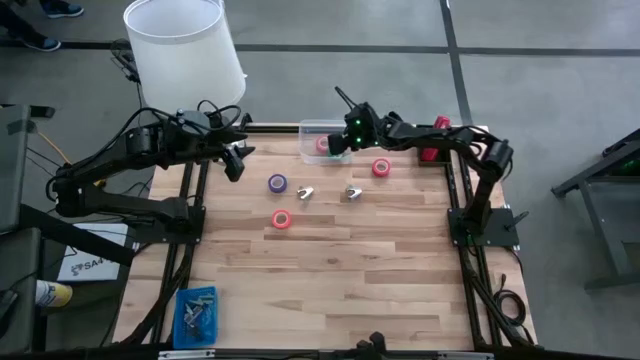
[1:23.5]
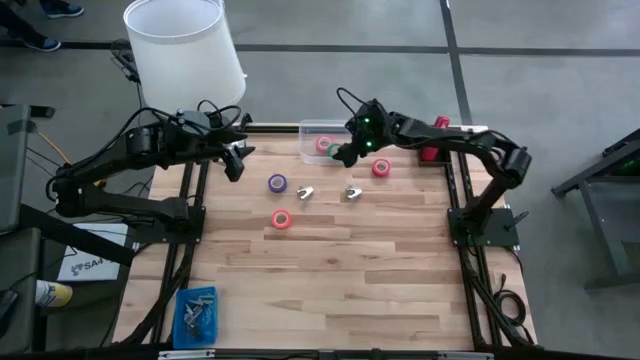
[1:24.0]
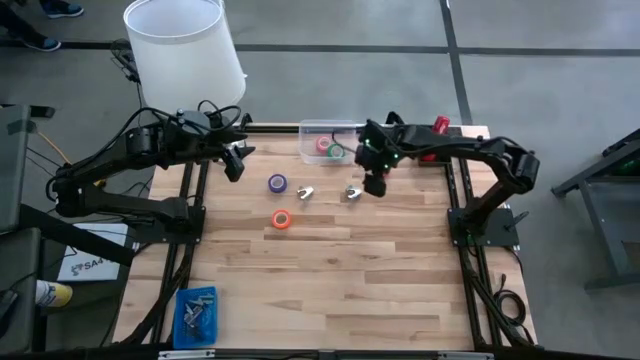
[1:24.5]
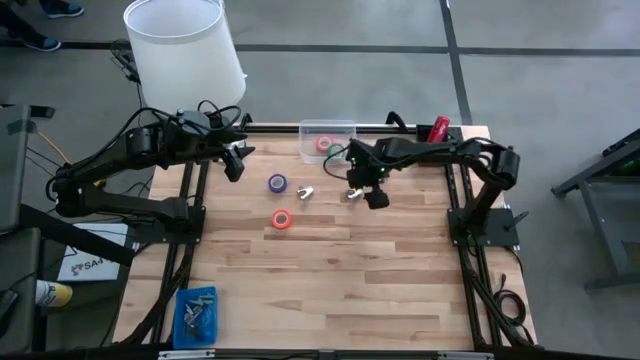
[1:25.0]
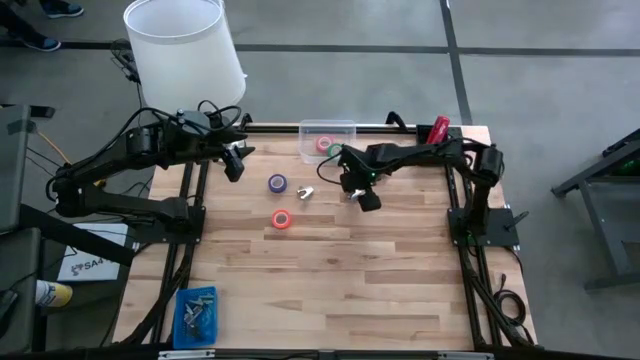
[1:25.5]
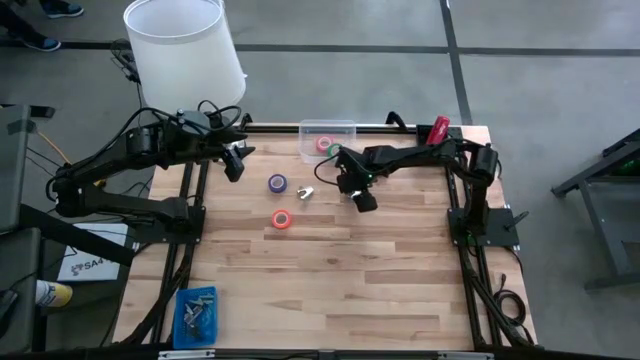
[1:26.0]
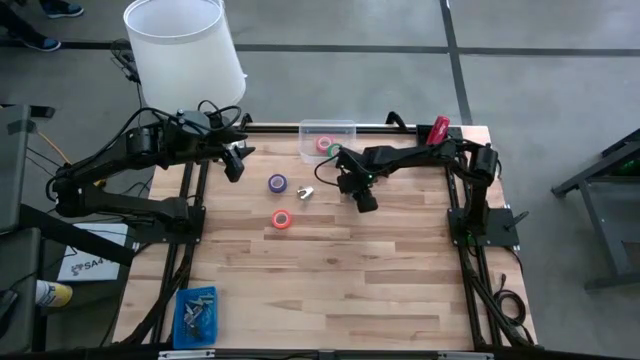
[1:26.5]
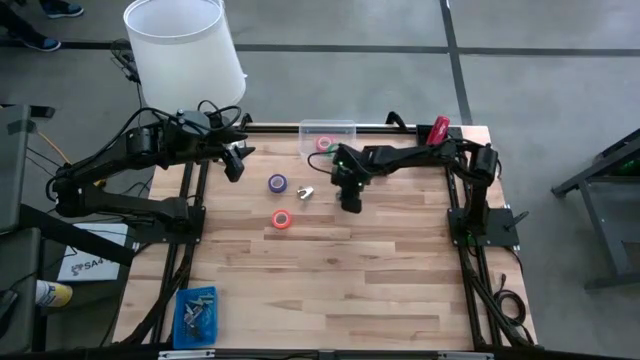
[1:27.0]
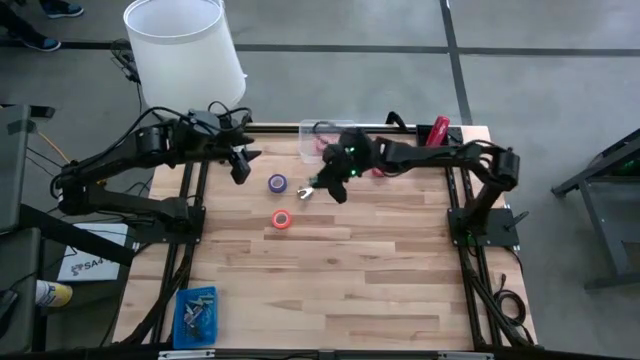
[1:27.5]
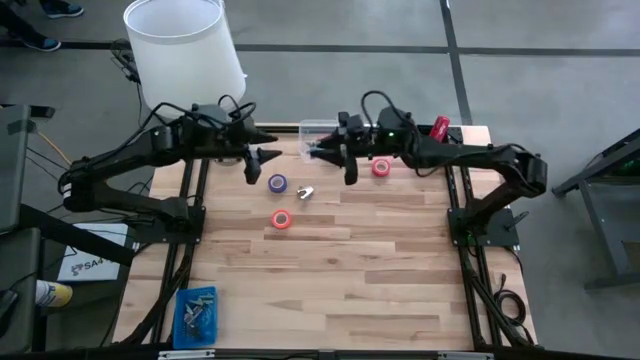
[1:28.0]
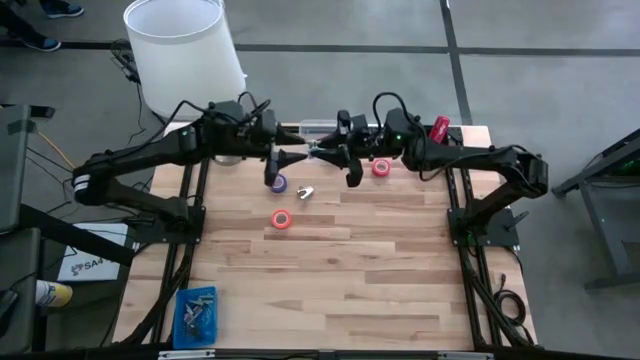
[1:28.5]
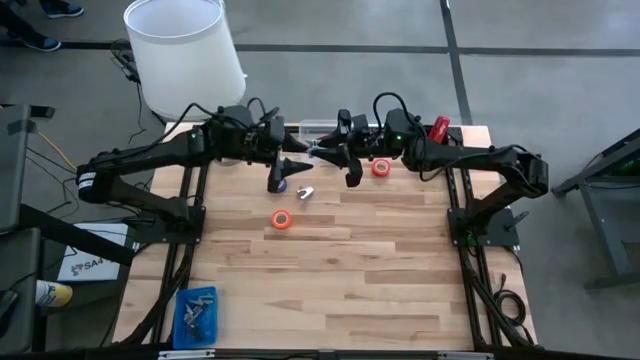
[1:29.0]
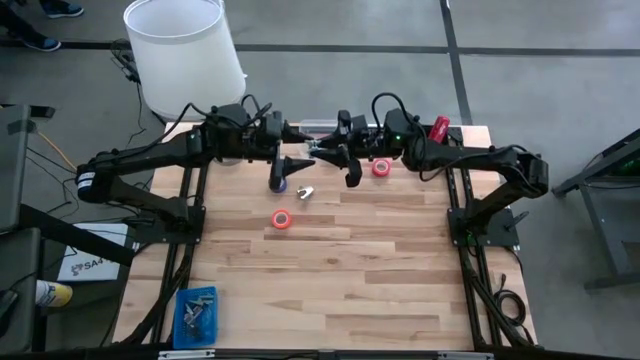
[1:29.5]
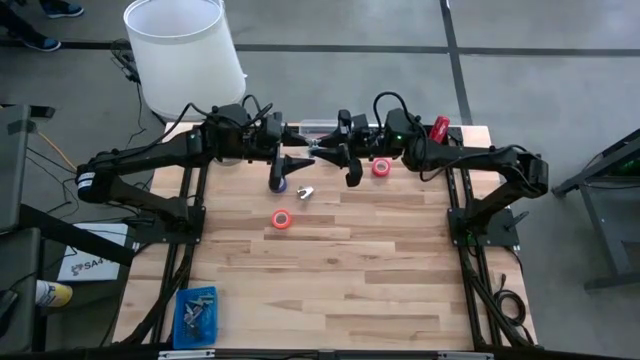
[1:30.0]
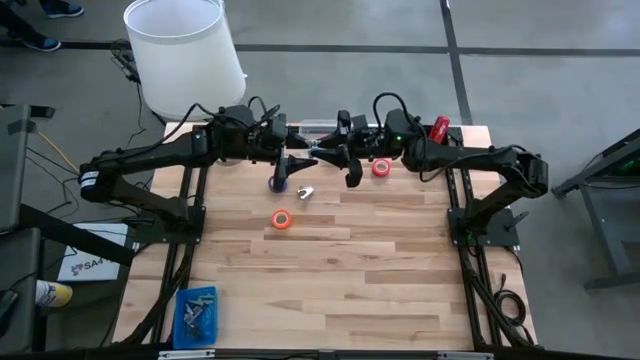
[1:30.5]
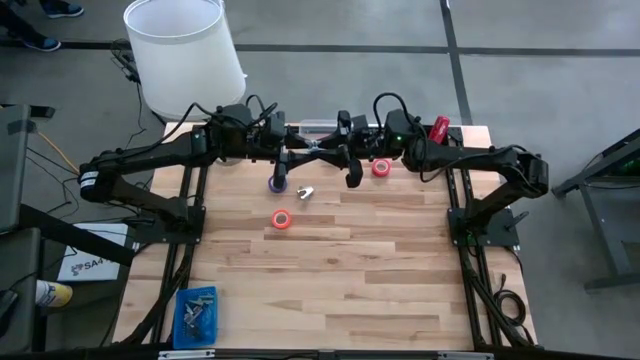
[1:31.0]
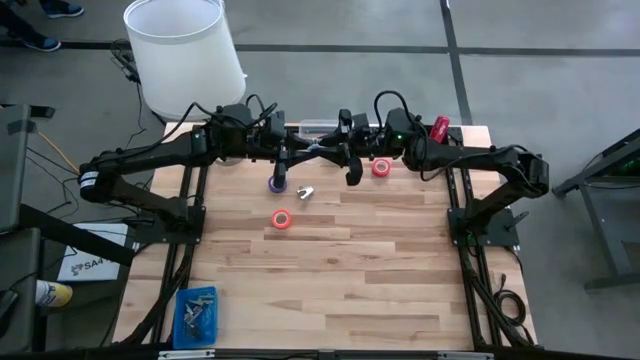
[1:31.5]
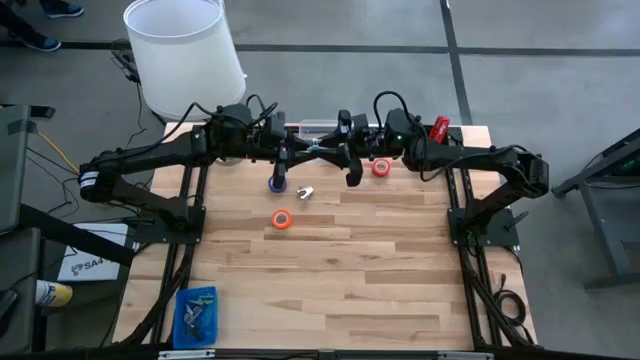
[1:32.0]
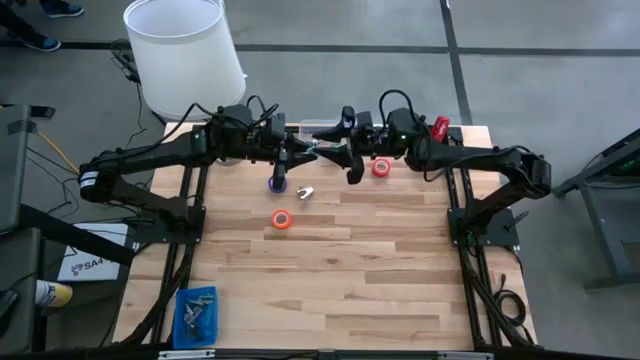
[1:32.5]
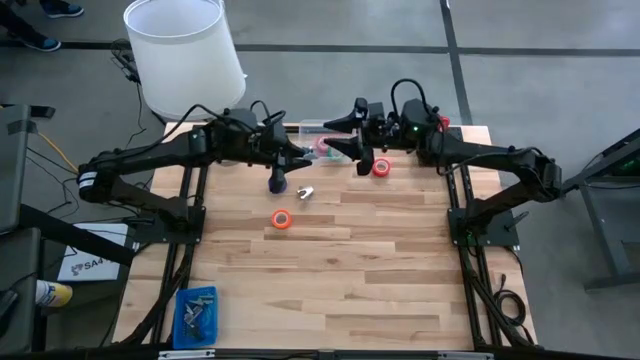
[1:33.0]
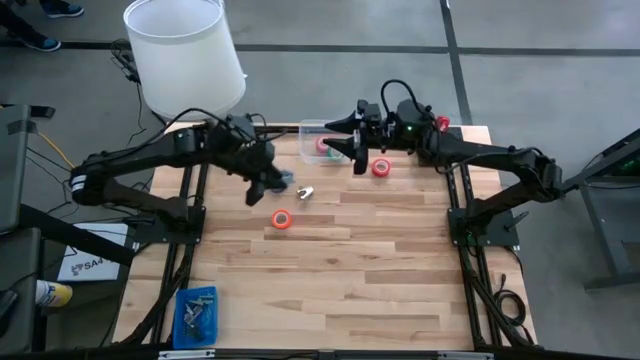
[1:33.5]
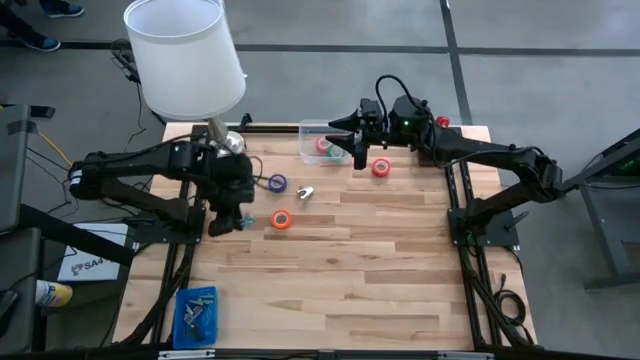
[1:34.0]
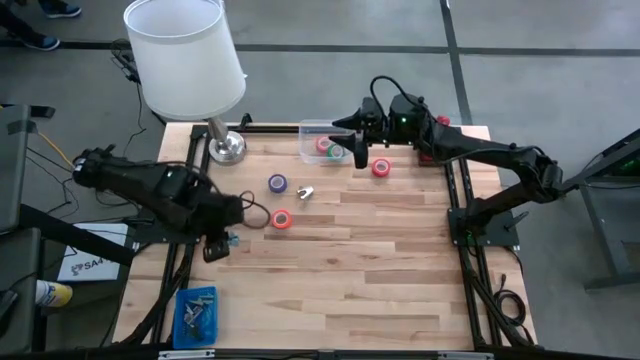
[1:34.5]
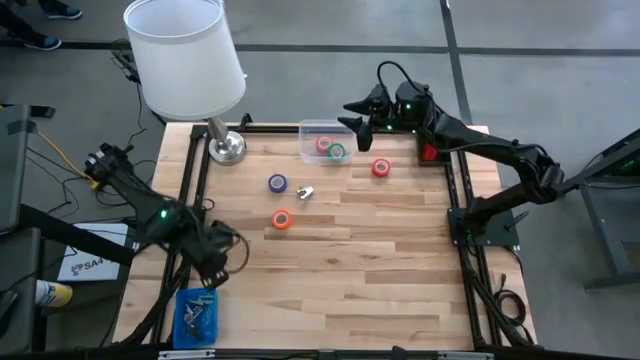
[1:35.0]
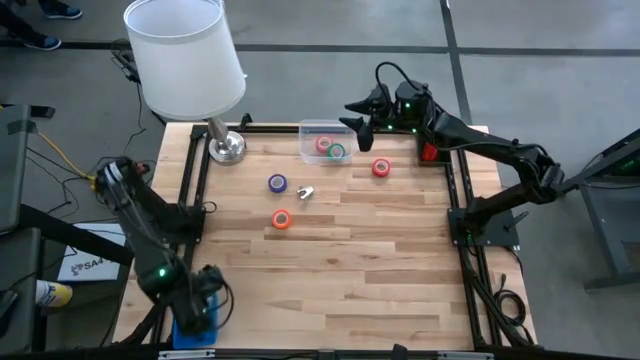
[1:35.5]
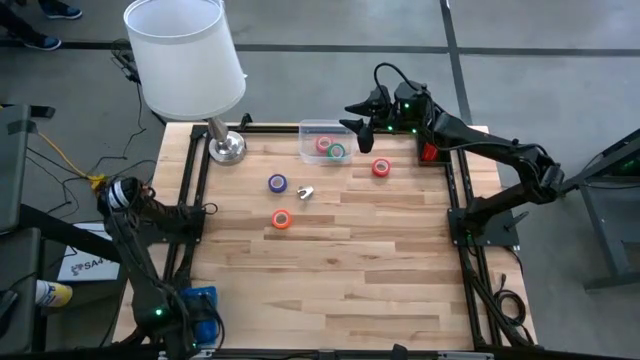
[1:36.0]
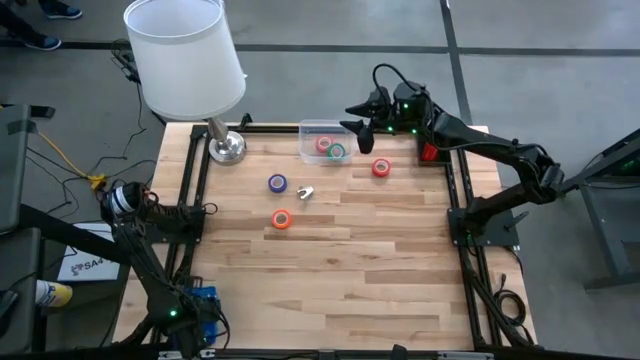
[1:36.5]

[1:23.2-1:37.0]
Task: Pick and place Stapler, Stapler remover, tape
Put the light blue staple remover into the blue bin

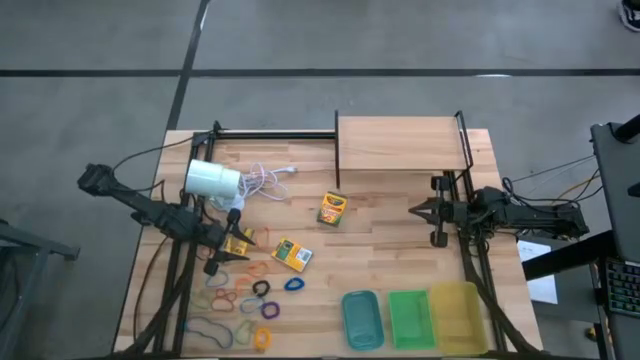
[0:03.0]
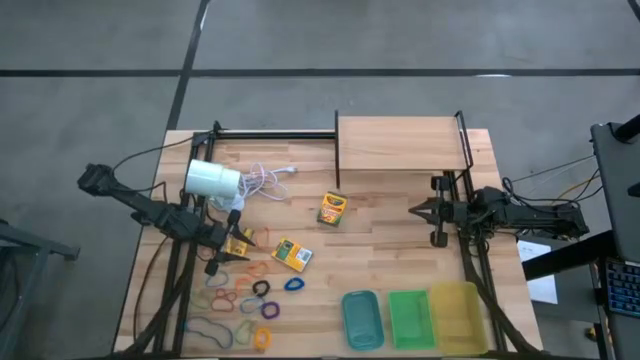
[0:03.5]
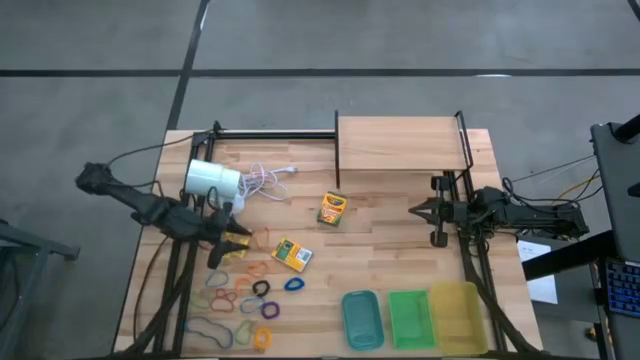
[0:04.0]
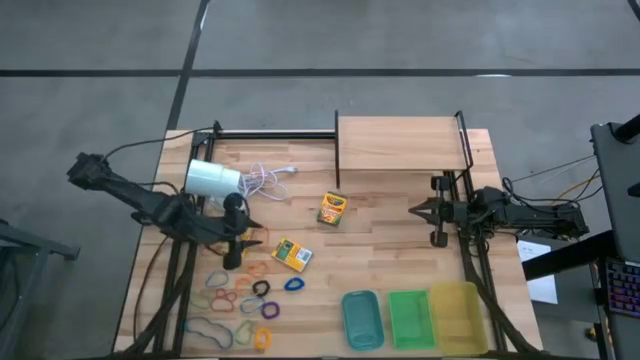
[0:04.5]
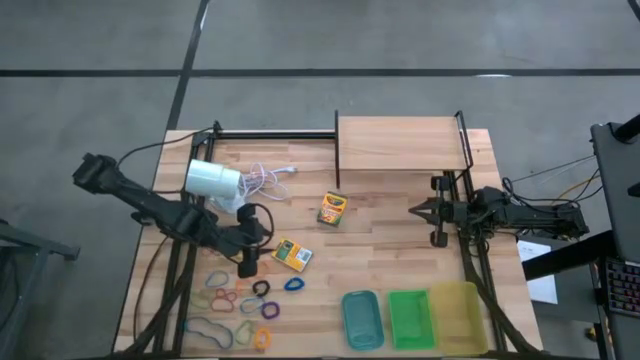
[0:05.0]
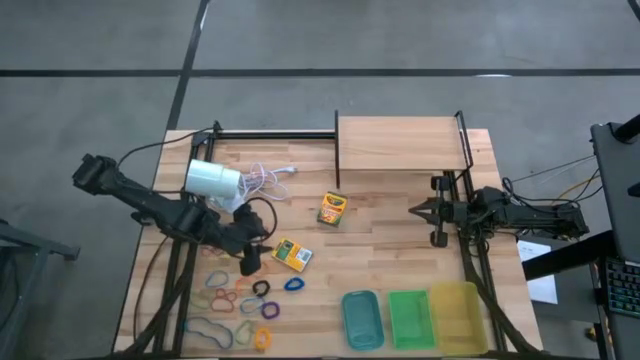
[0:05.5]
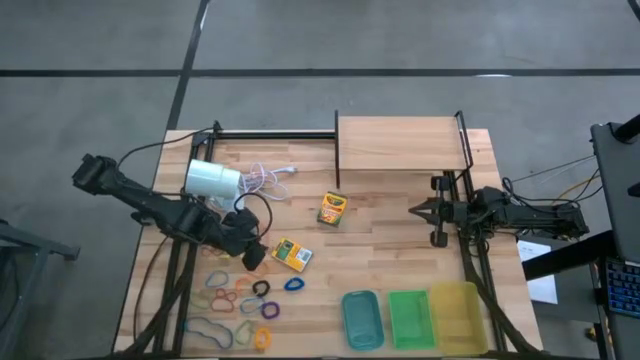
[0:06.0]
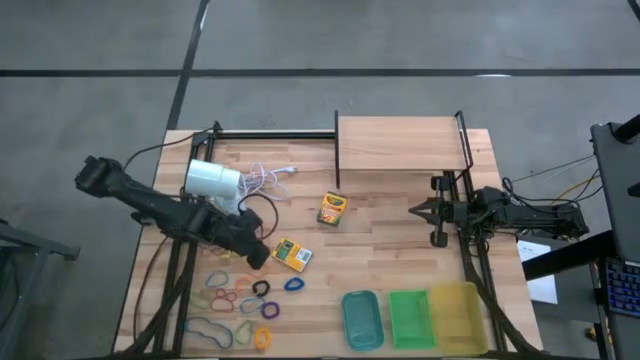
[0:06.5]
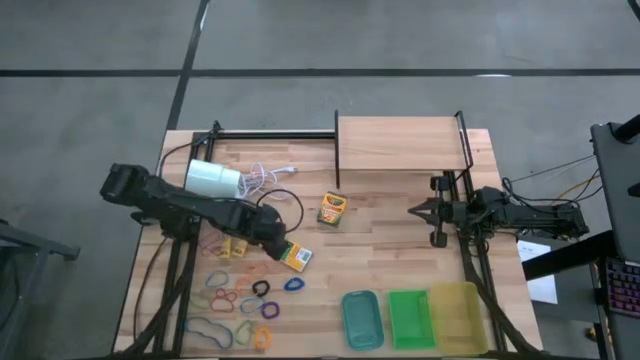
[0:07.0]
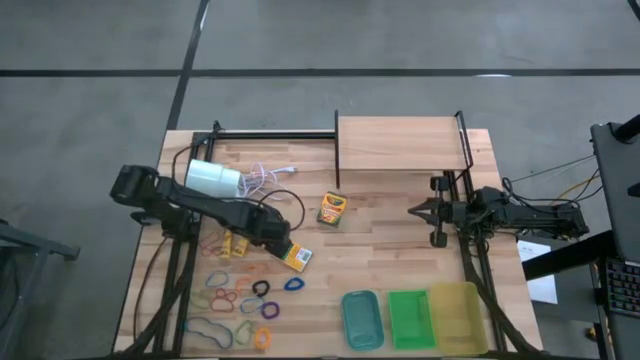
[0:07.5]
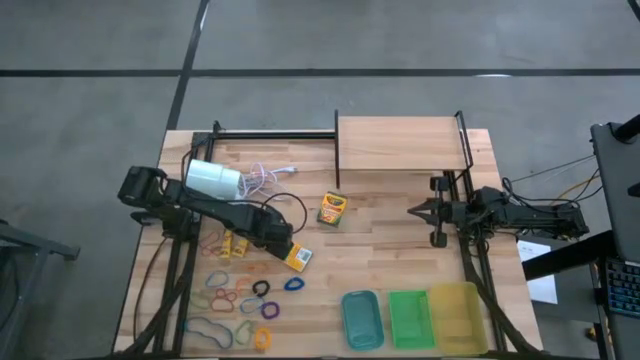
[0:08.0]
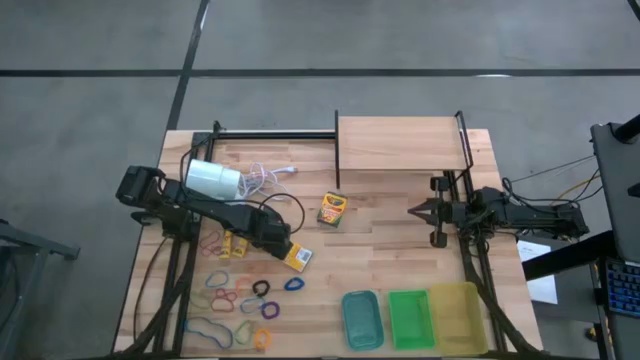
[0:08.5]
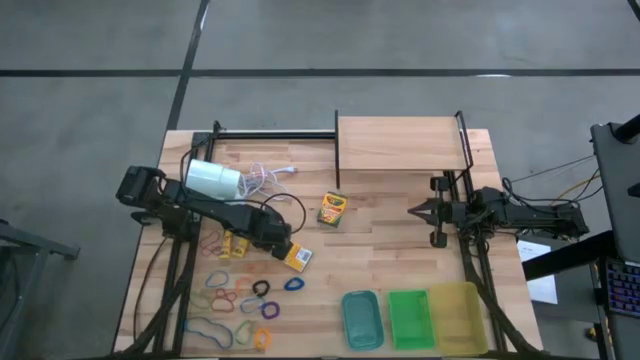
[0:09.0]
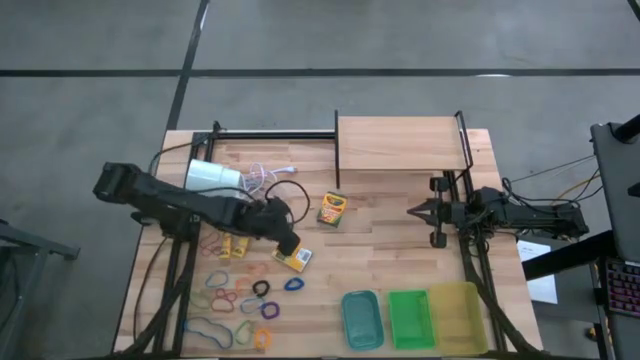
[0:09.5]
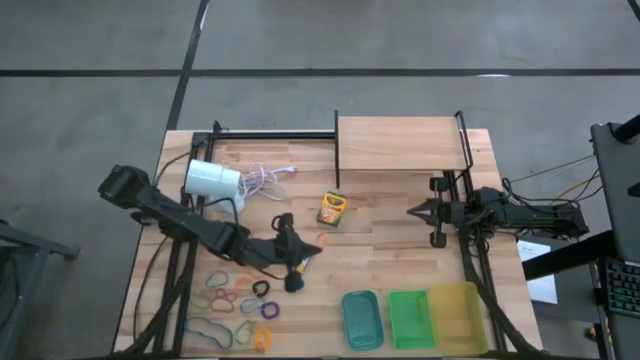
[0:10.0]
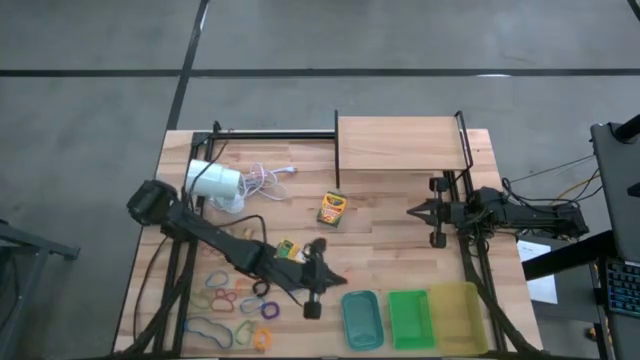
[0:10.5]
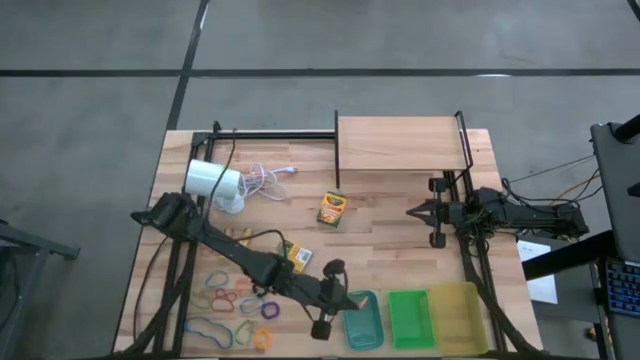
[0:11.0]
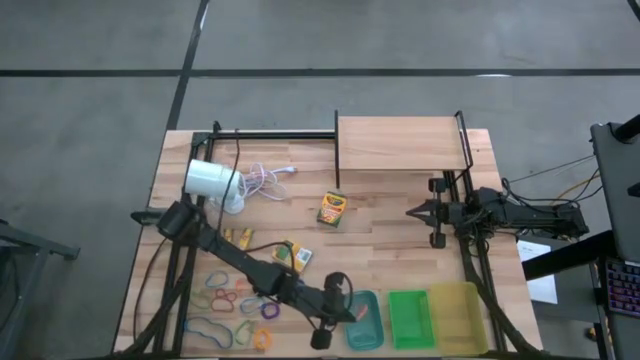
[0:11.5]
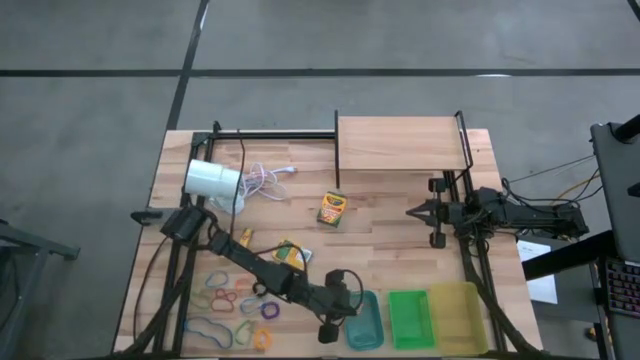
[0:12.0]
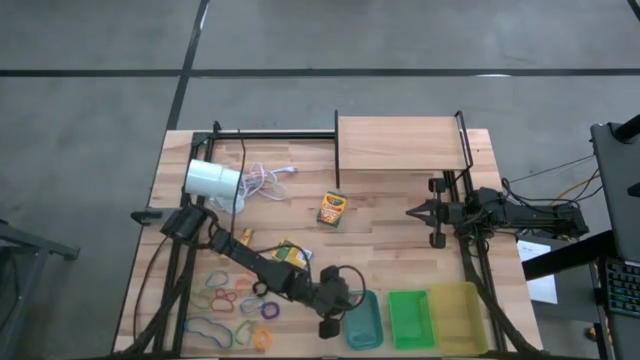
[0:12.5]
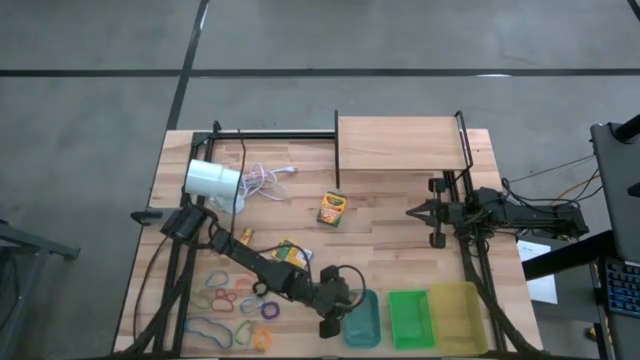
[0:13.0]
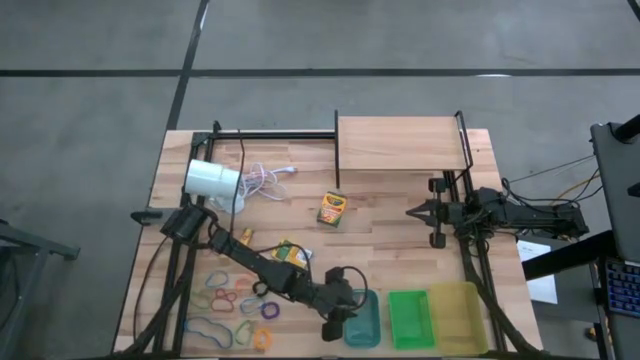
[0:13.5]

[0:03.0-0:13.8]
Task: Pick & Place Office Desk Supplies
Put the orange rubber band into the blue bin
